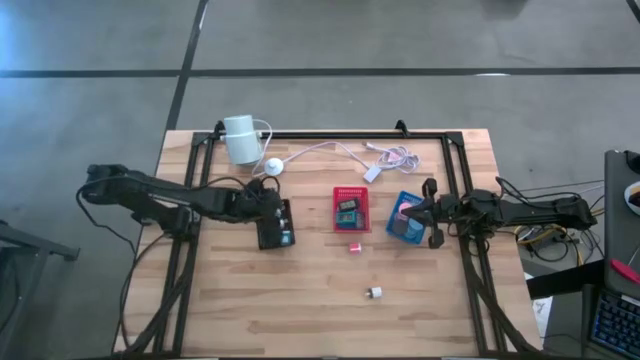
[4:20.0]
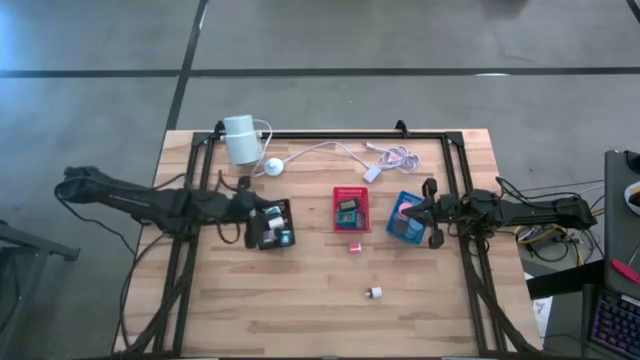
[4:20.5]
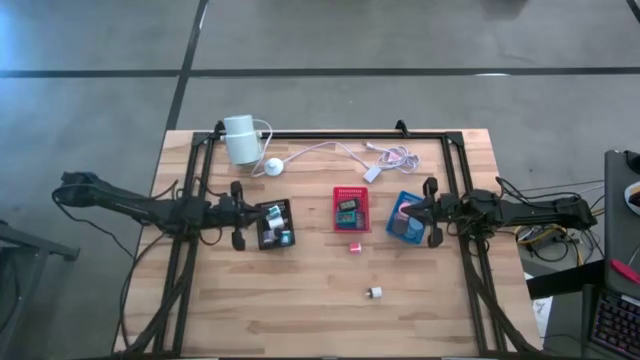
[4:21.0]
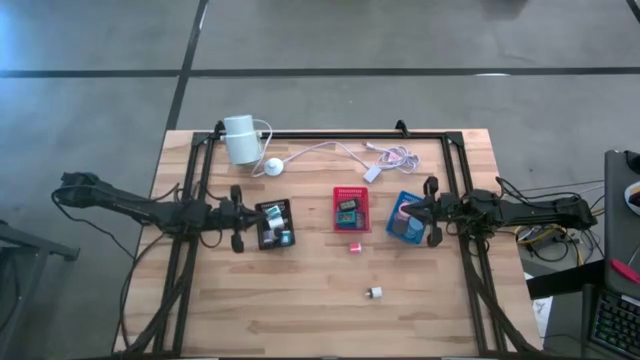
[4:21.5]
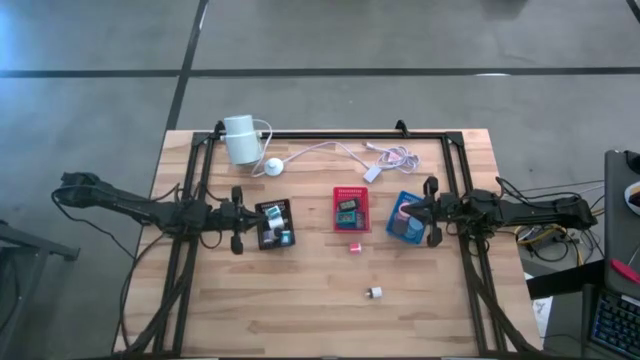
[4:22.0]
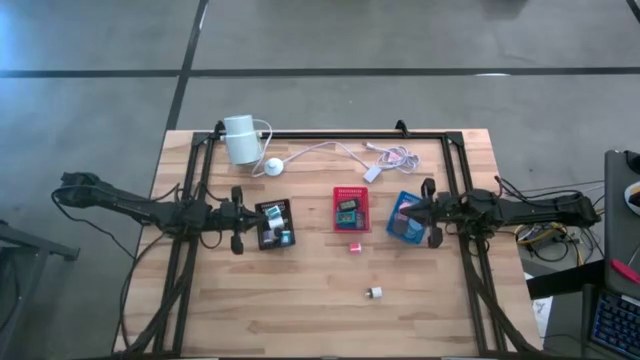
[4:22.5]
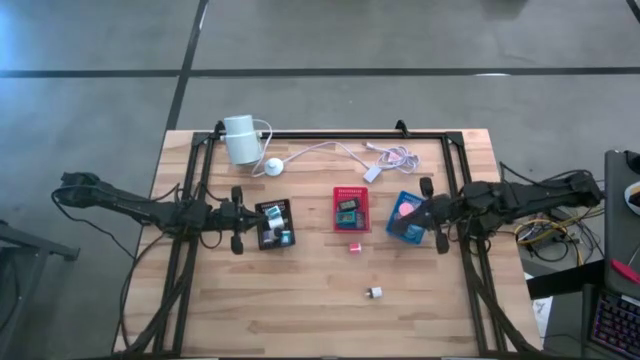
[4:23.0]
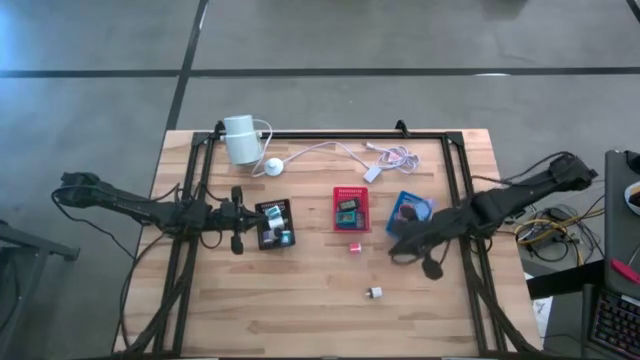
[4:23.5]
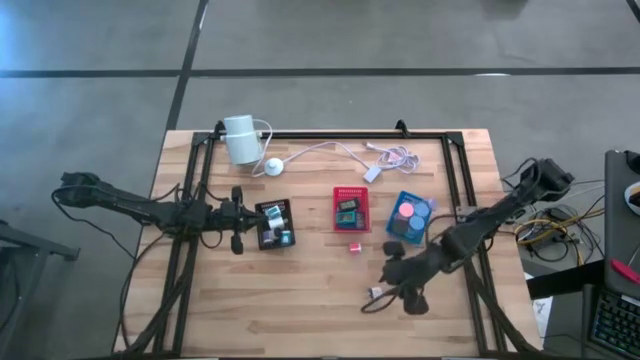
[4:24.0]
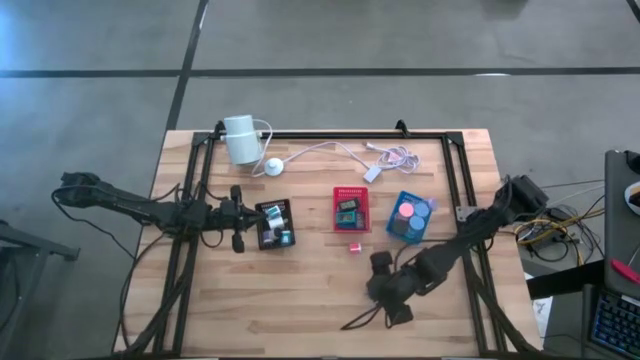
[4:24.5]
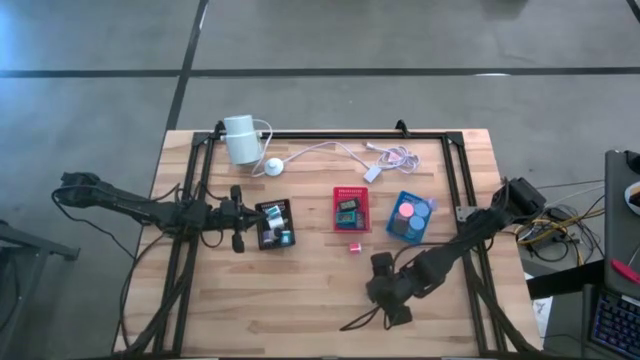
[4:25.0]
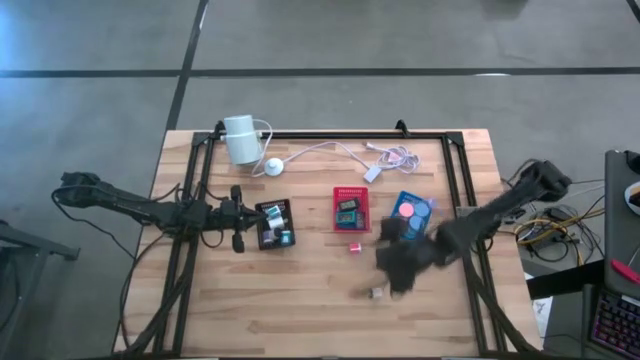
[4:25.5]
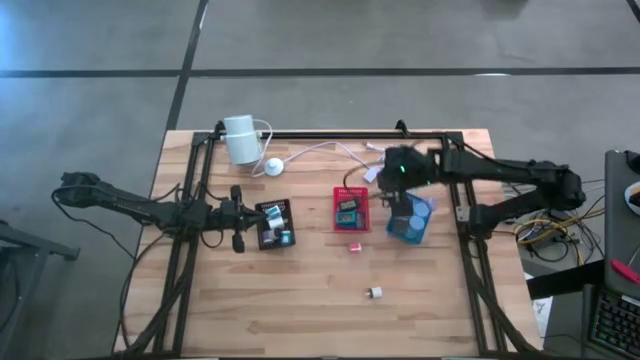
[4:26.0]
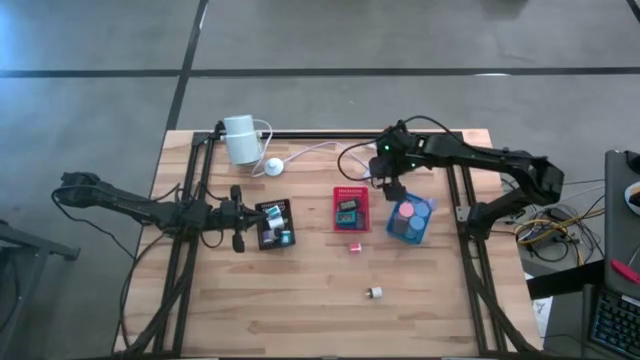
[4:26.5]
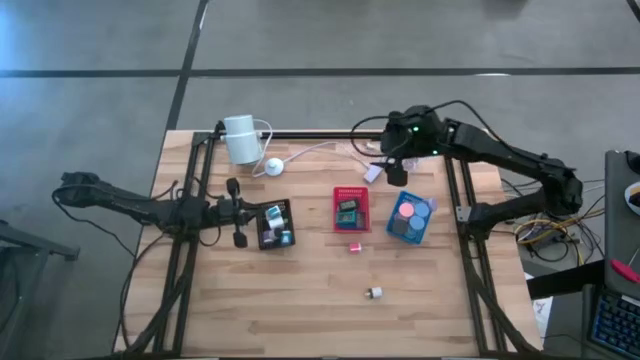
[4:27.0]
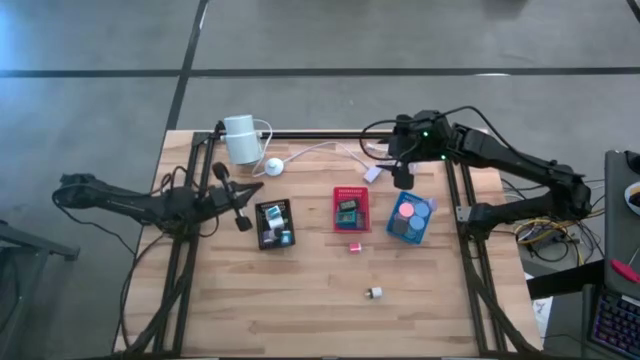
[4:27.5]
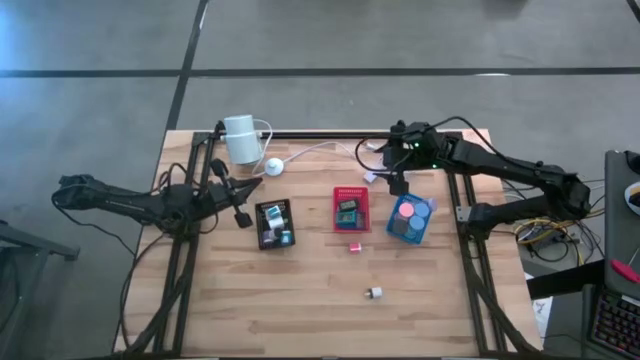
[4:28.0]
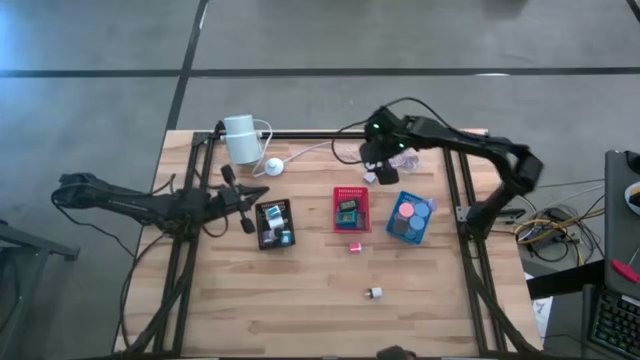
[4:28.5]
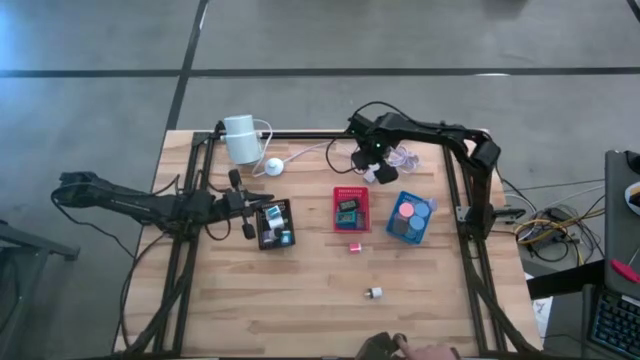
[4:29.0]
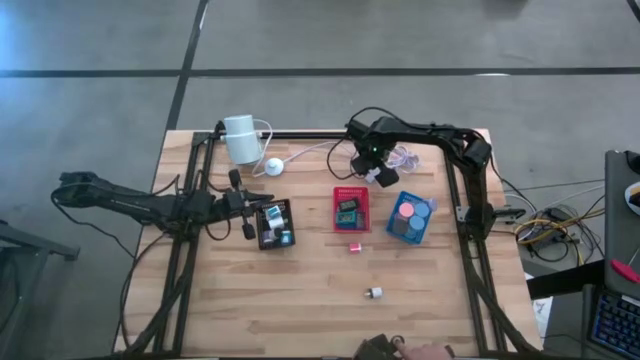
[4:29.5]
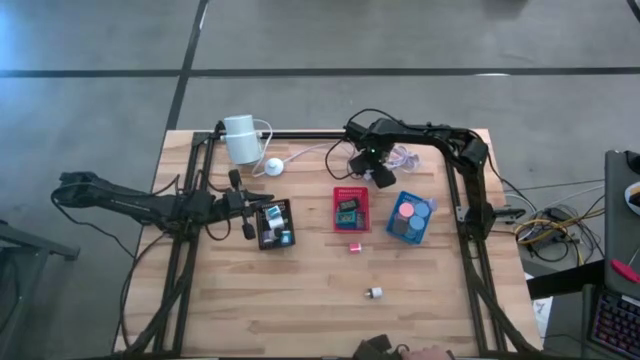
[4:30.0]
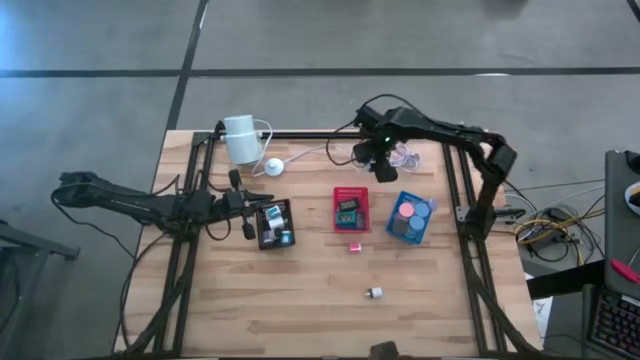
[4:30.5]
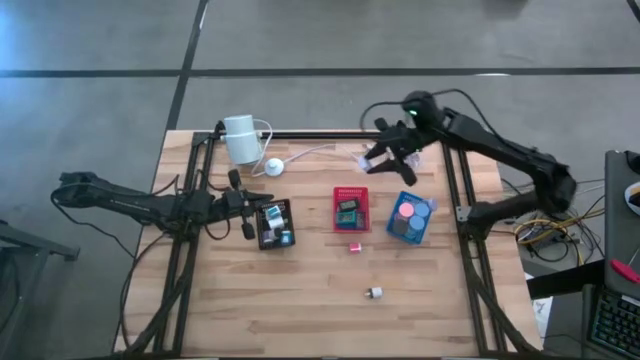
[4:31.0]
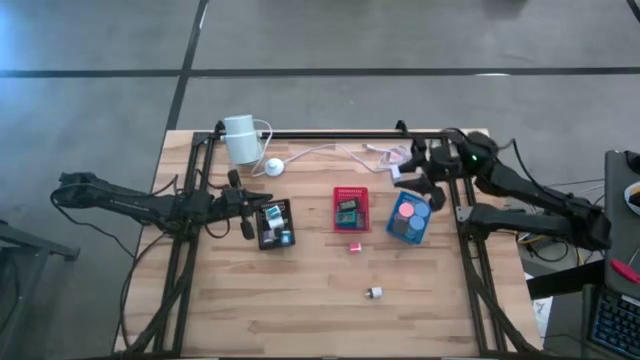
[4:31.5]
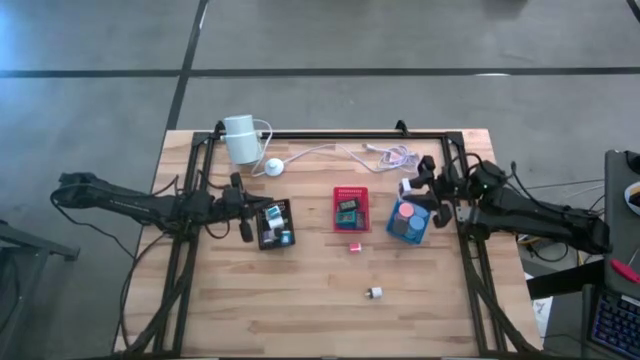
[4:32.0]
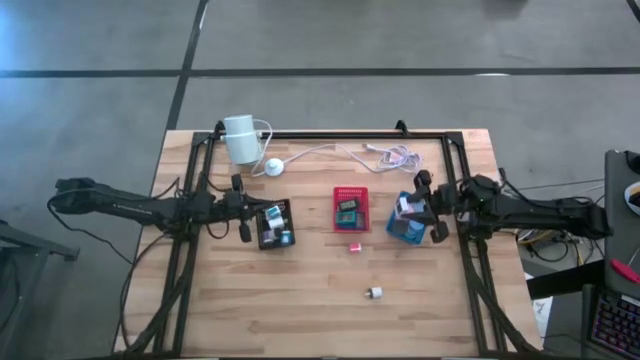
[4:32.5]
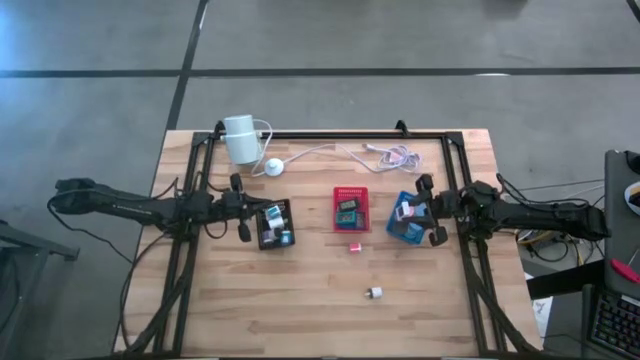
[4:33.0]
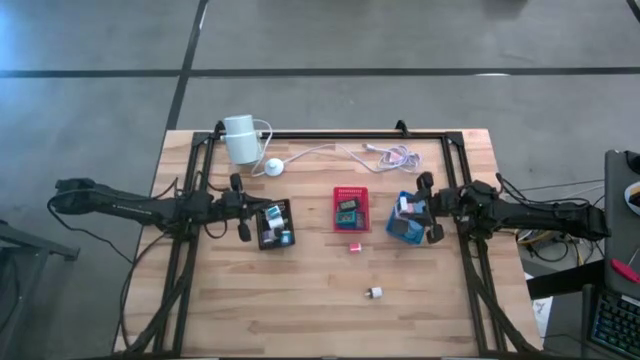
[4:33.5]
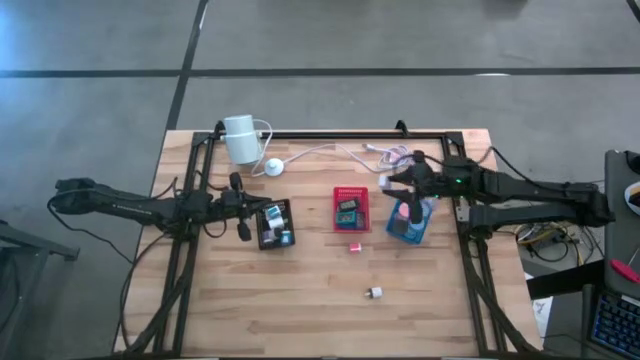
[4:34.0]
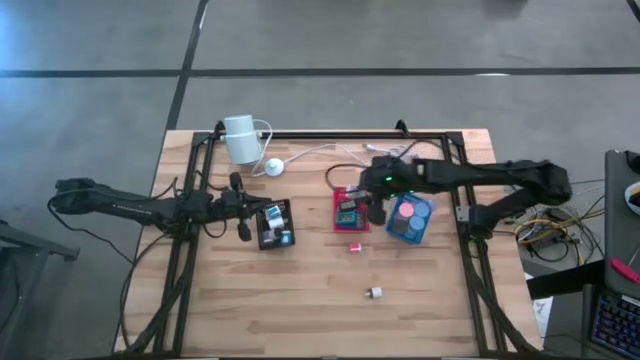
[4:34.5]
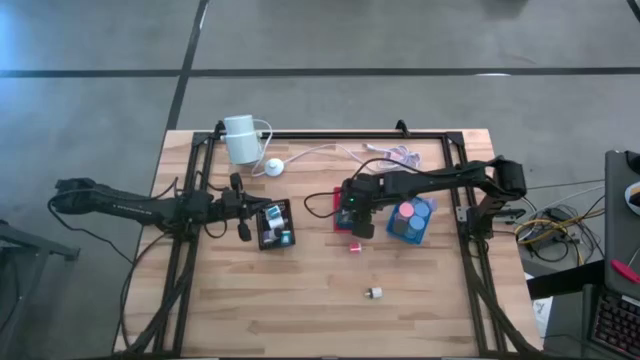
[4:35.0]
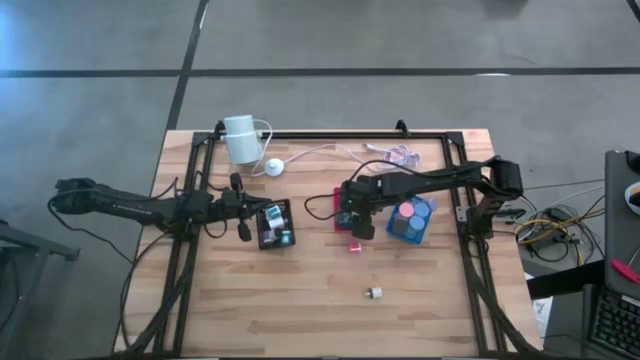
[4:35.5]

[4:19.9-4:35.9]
Task: Pick & Place Office items
Put the white digital clock into the red bin

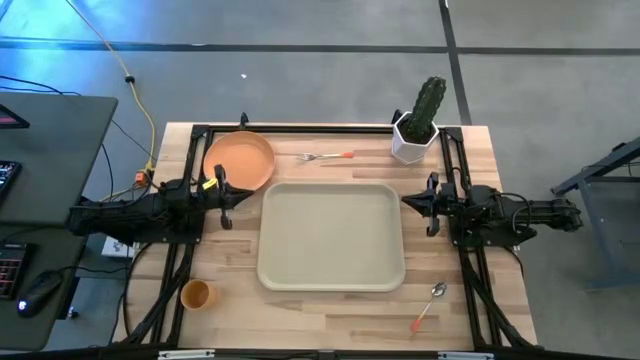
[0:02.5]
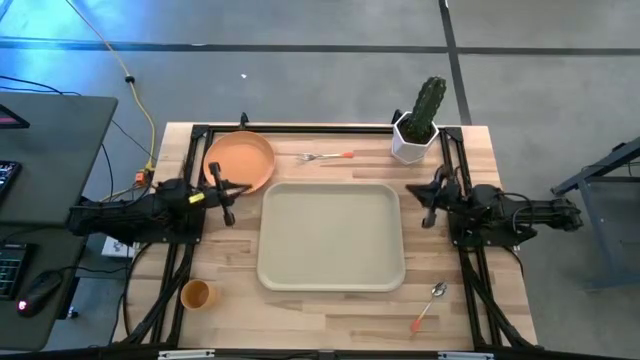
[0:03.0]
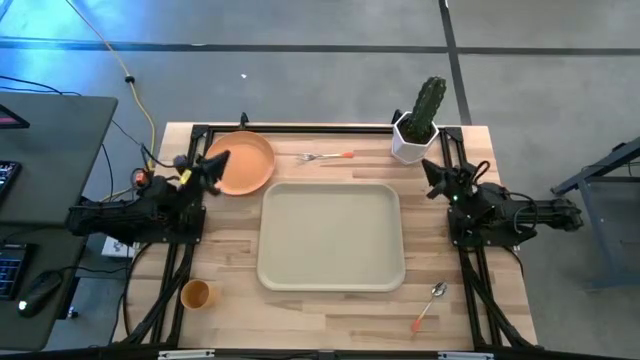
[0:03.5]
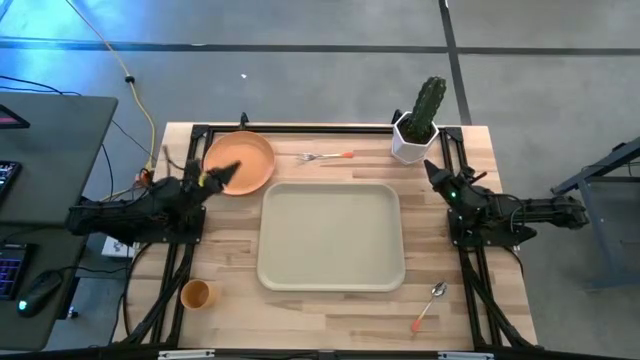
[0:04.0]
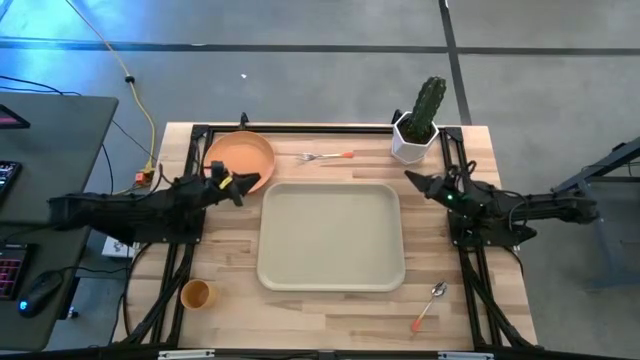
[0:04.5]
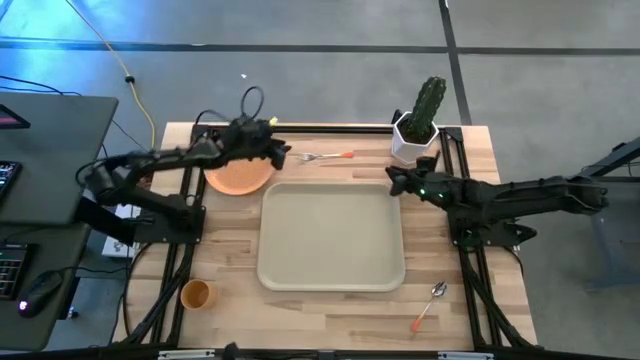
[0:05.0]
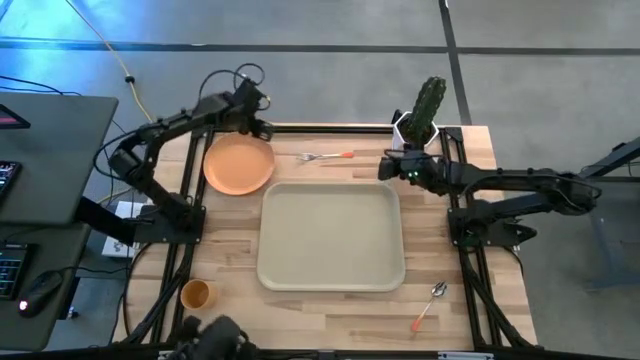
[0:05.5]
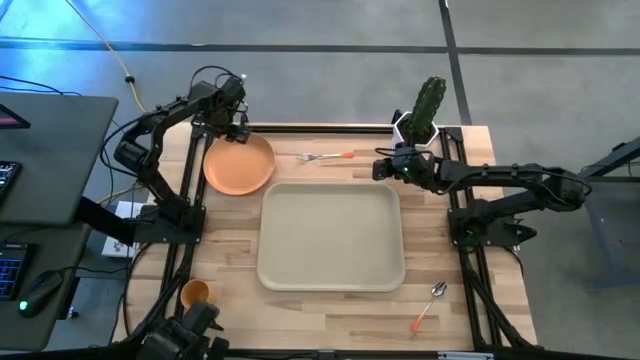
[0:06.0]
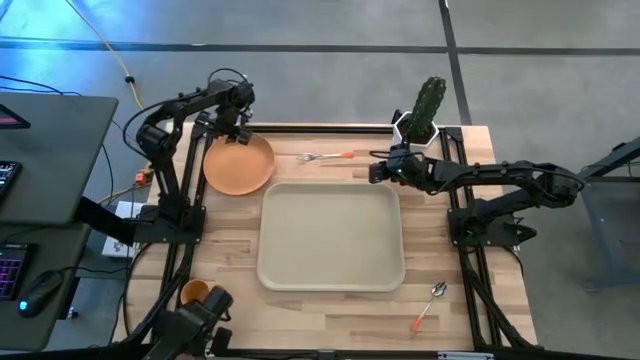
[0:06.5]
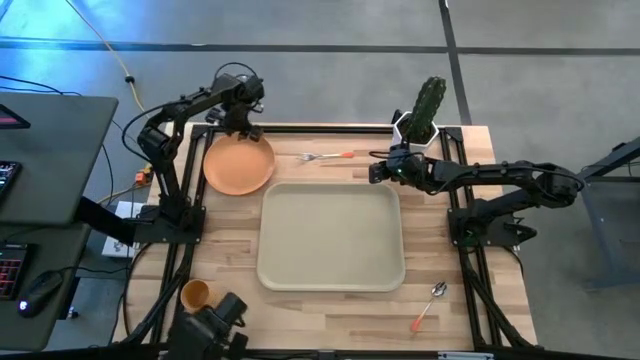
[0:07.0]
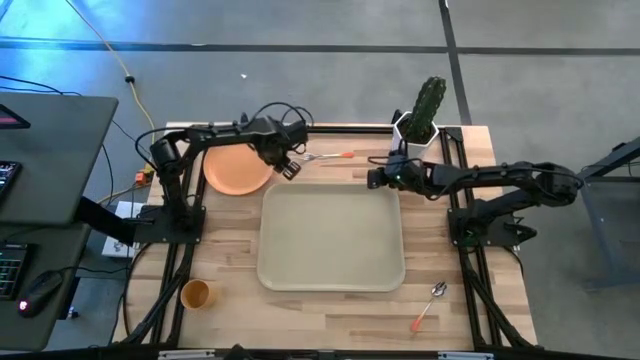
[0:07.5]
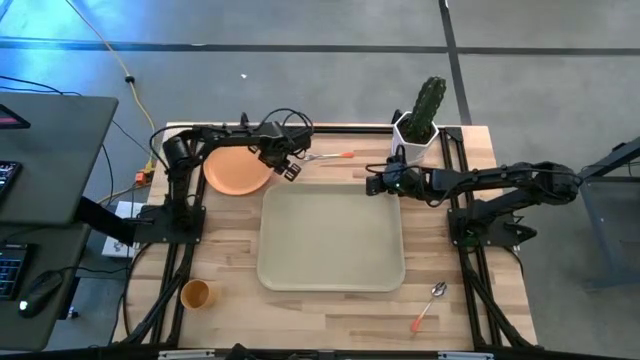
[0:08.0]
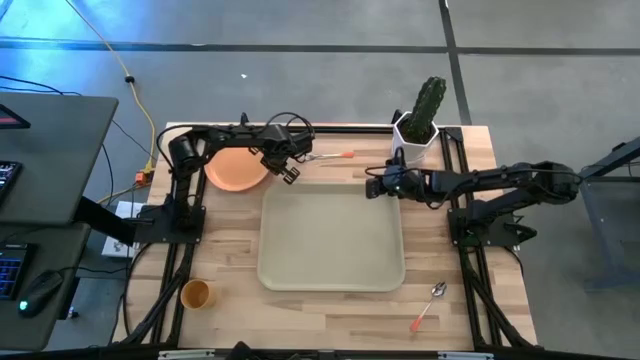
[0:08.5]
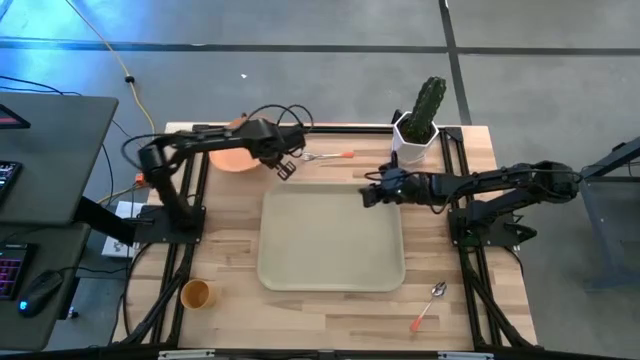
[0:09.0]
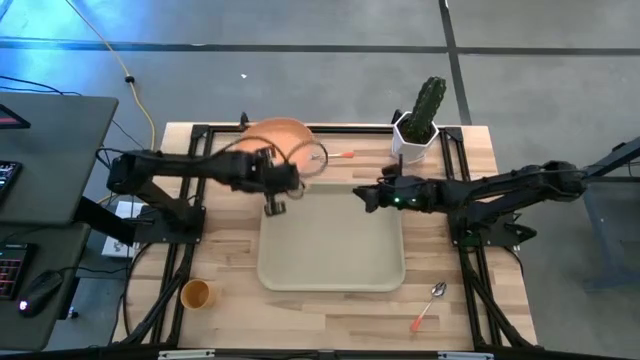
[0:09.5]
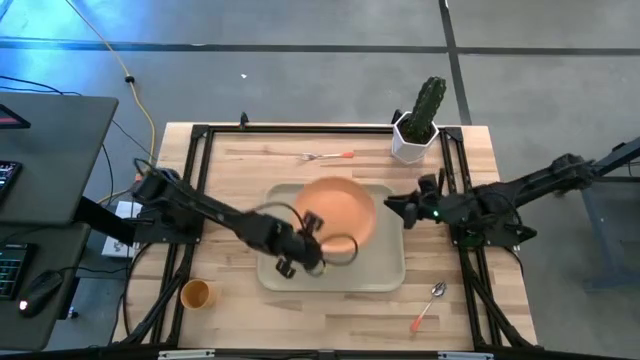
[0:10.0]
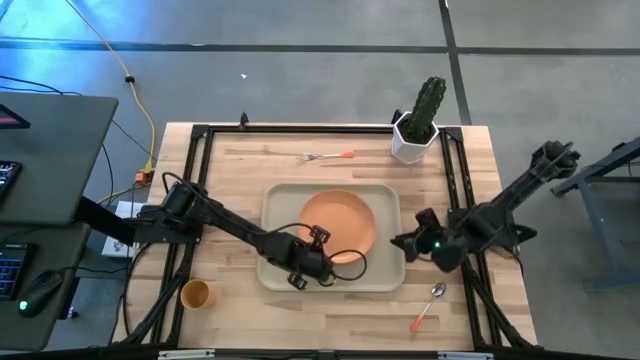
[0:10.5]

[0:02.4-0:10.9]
Task: Pick and place plate/cup/fork/spoon on tray
Put the orange plate on the middle of the light brown serving tray
